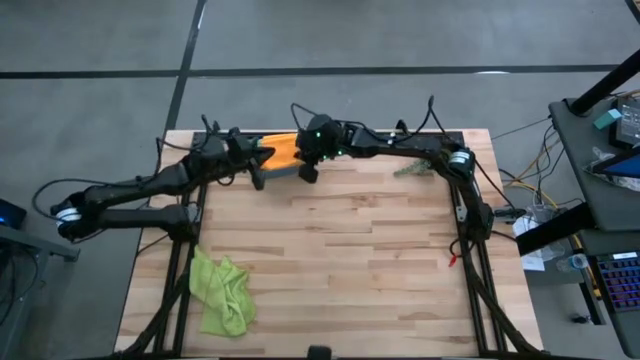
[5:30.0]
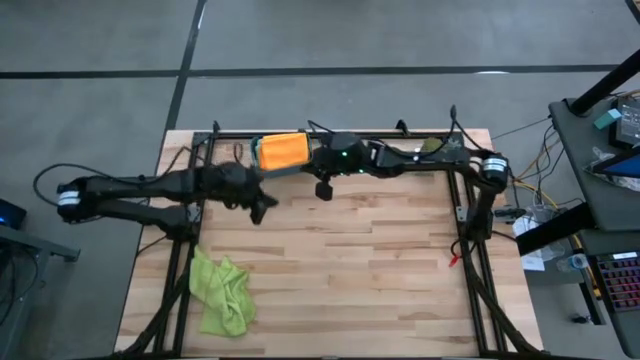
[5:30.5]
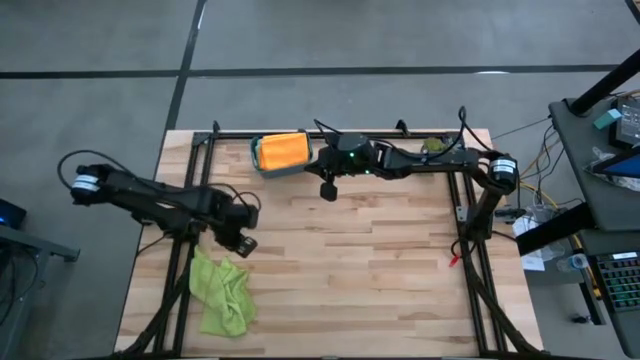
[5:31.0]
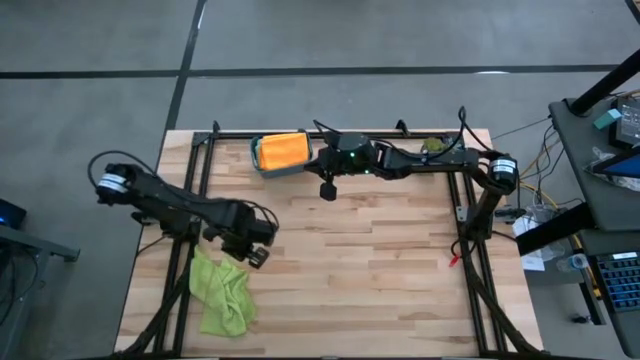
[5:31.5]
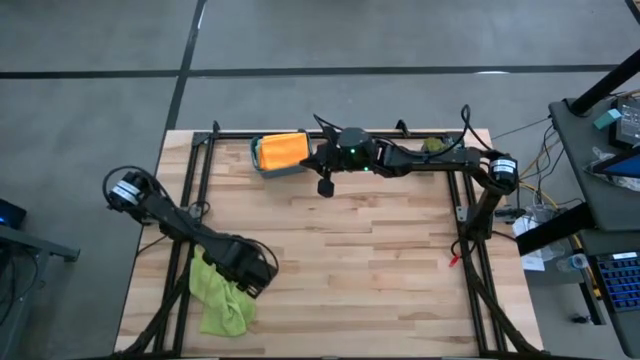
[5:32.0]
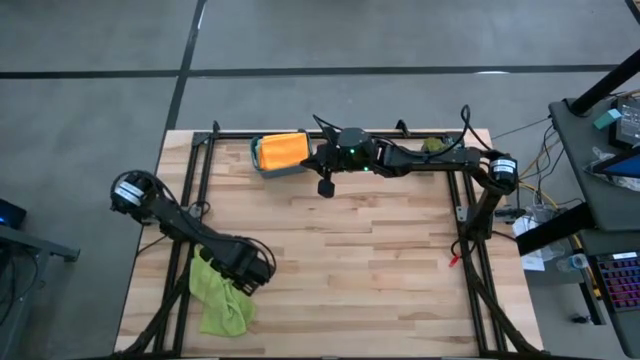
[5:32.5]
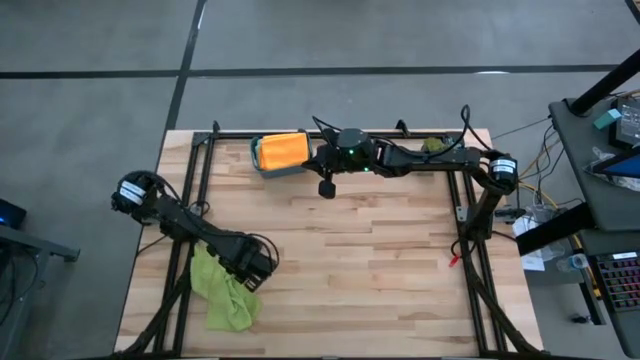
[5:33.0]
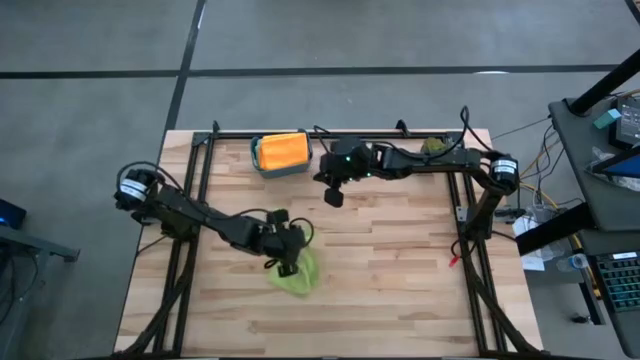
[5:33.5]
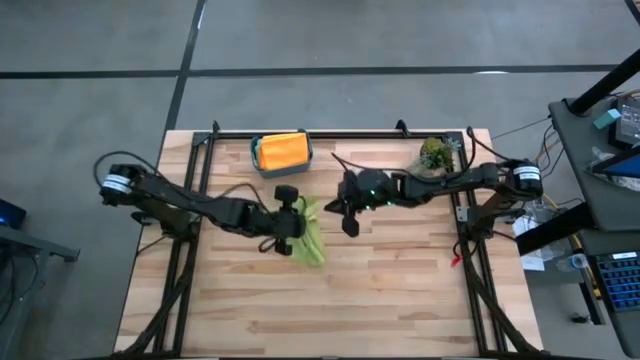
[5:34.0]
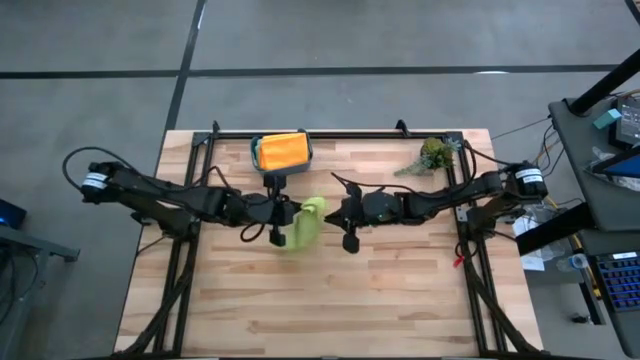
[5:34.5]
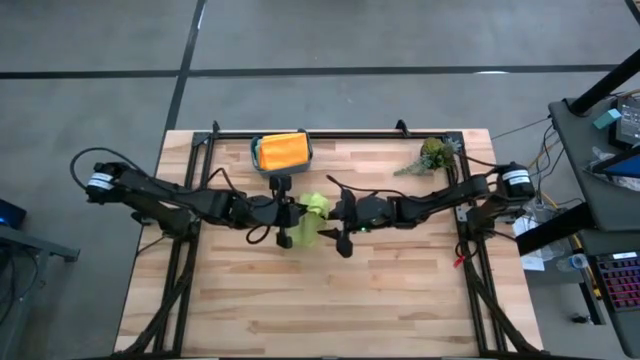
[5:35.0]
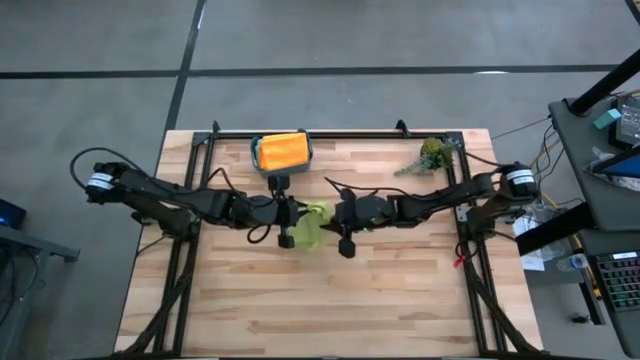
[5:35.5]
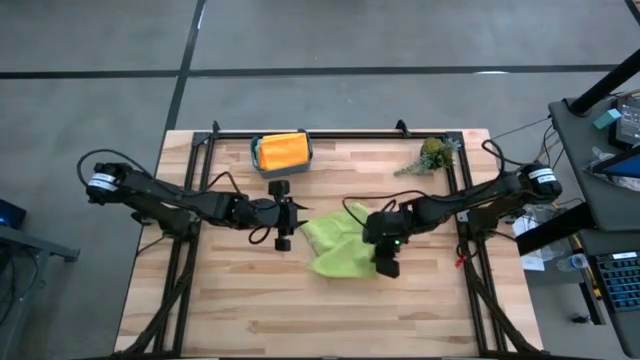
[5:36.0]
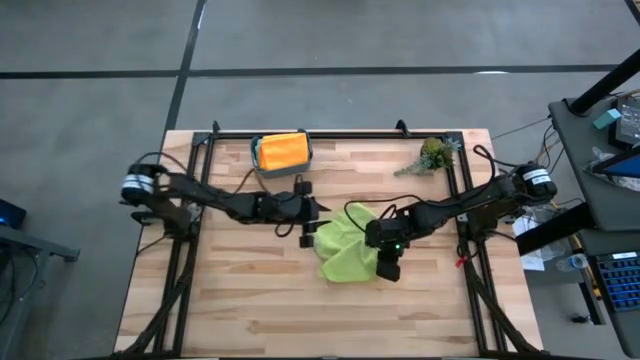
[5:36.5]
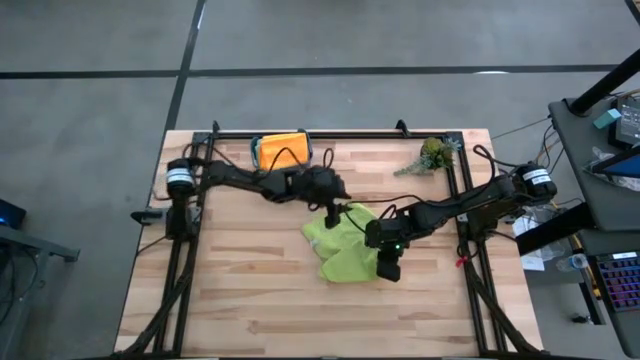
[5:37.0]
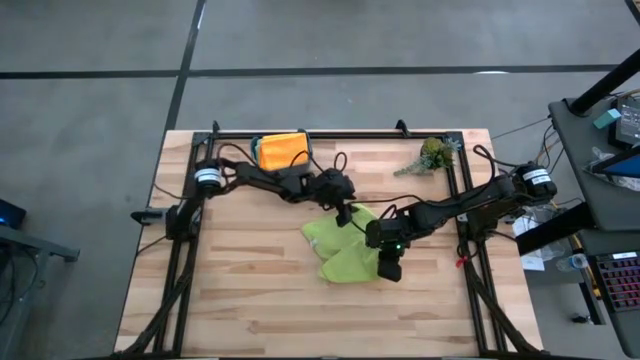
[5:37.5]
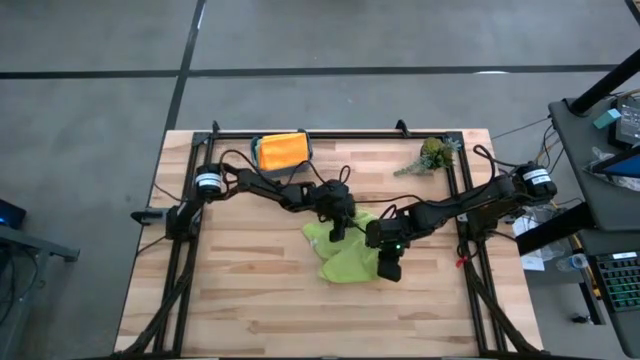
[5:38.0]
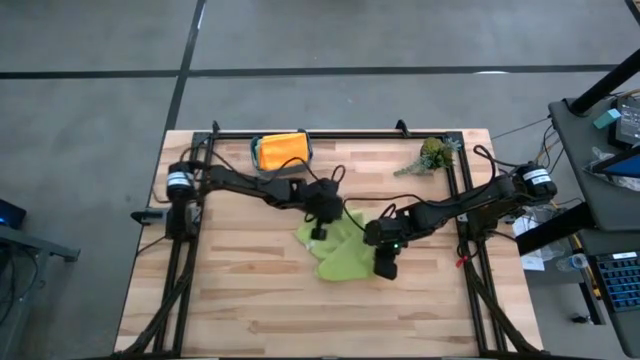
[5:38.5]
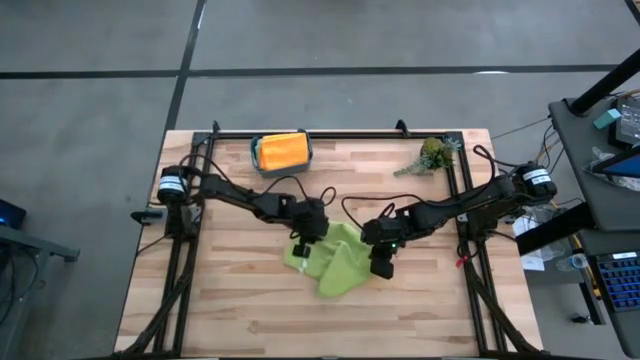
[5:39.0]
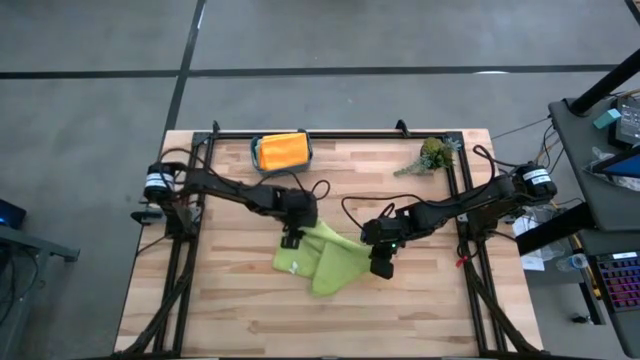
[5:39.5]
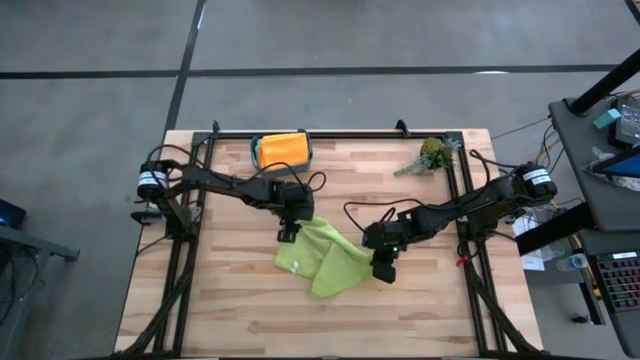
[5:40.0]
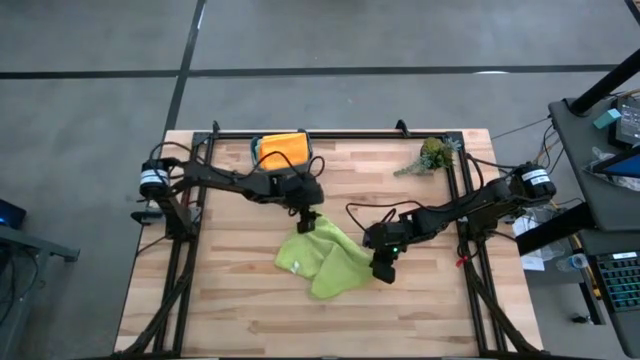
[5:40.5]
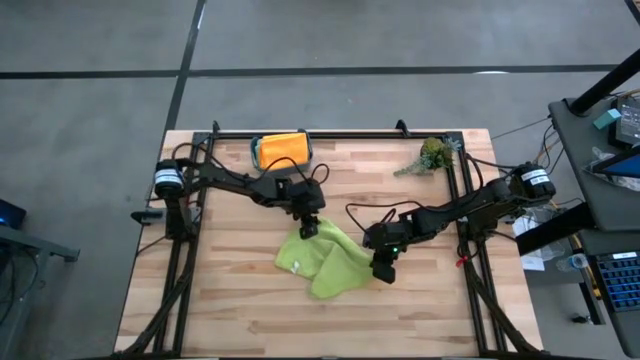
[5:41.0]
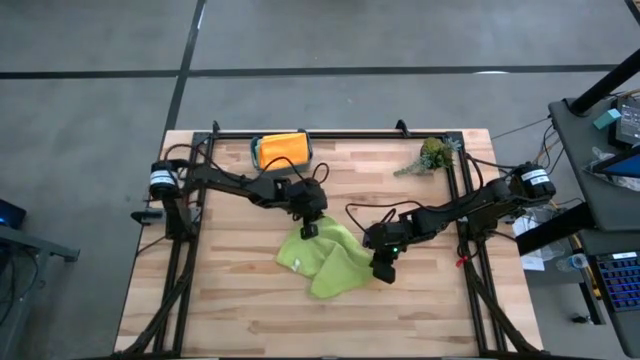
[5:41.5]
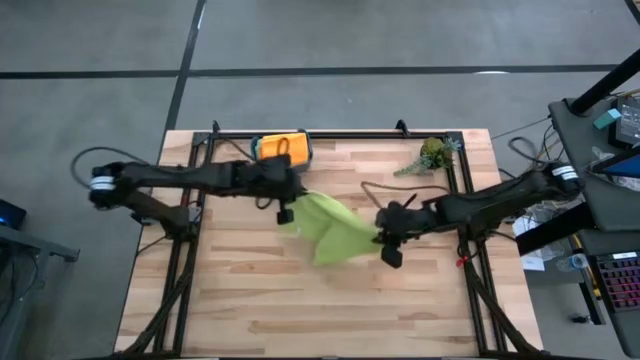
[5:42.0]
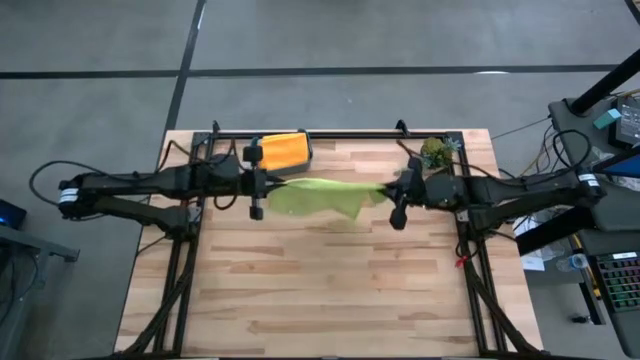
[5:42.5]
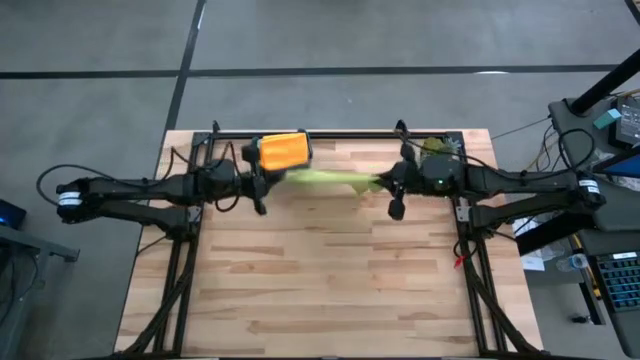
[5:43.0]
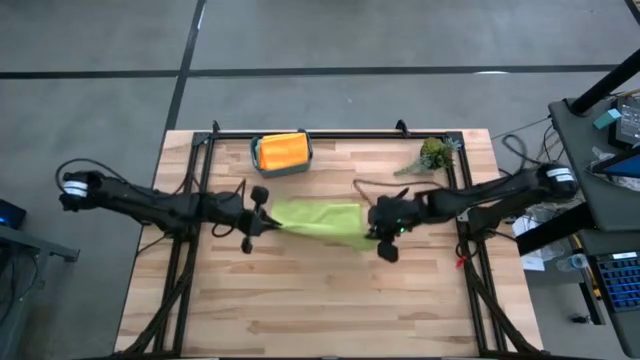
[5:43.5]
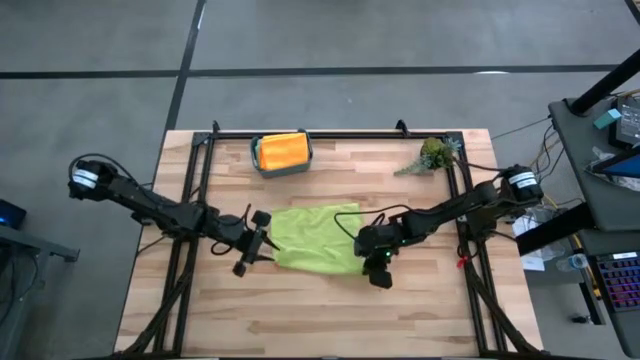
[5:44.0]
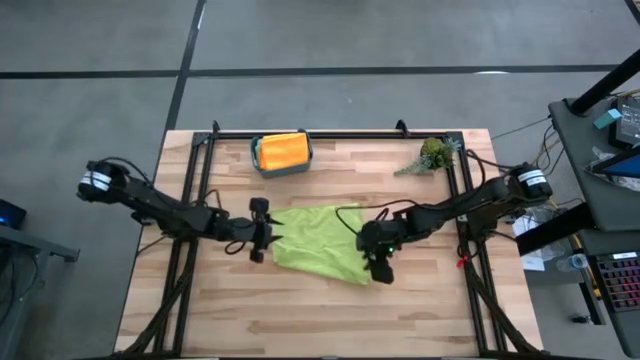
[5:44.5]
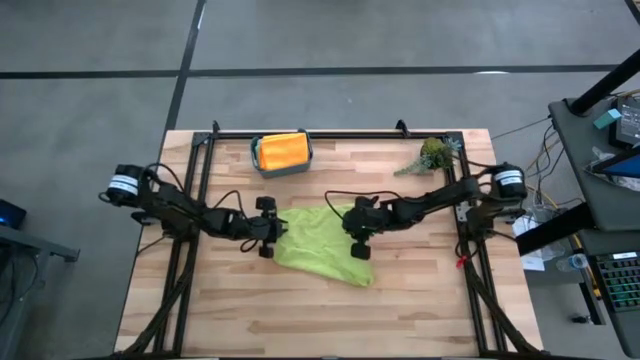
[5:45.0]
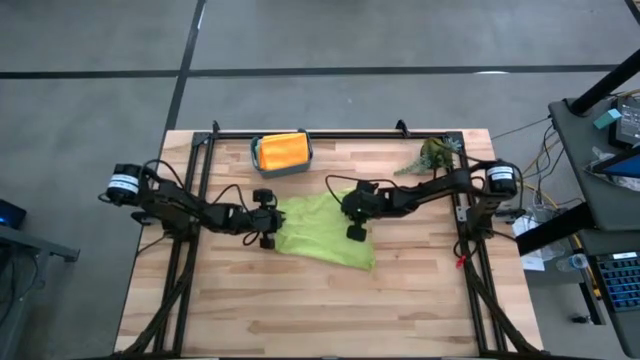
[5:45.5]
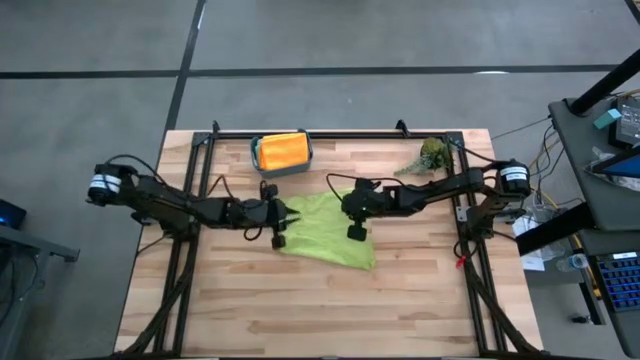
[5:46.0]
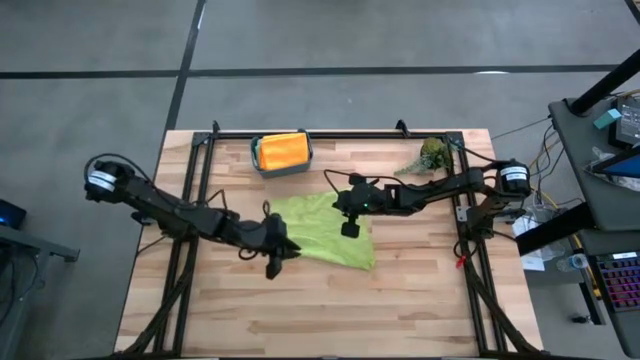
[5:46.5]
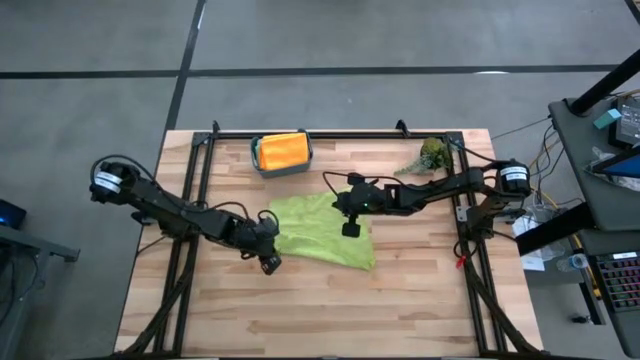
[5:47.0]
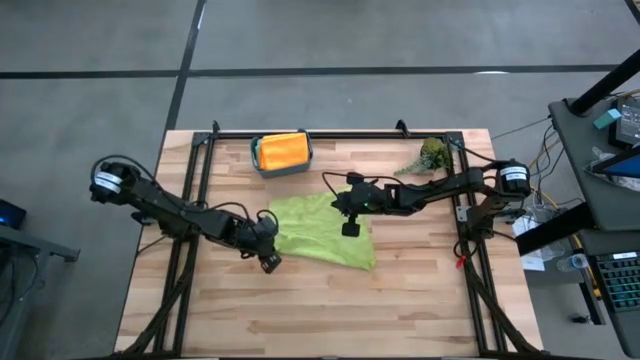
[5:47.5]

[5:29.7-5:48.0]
Task: Fold microfiber towels
Fold the light green microfiber towel

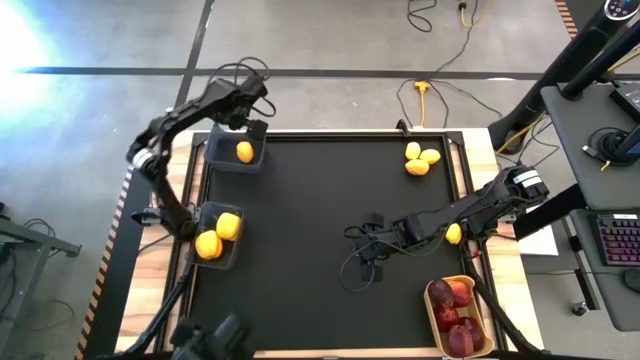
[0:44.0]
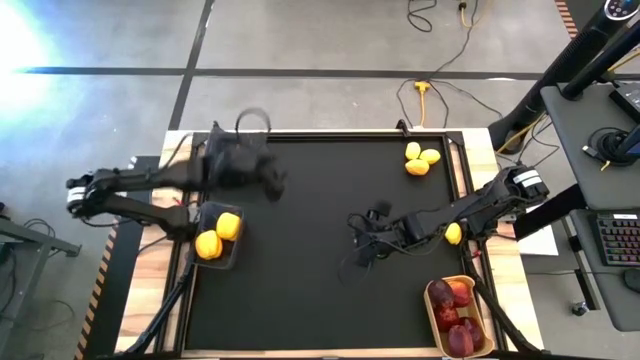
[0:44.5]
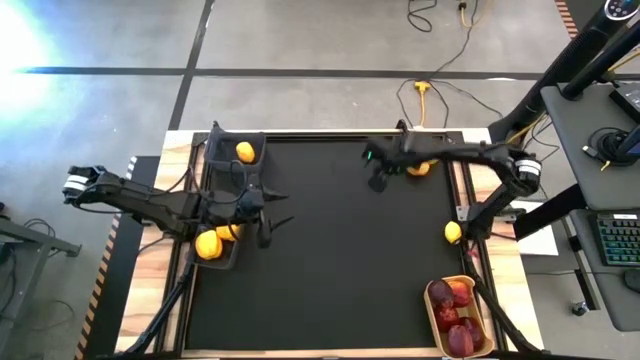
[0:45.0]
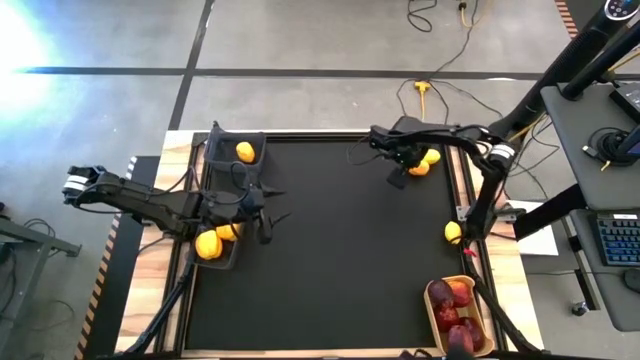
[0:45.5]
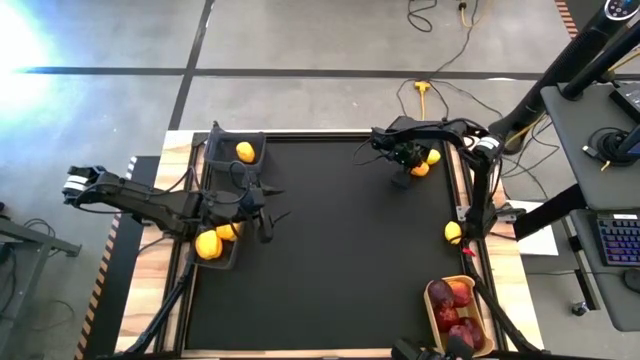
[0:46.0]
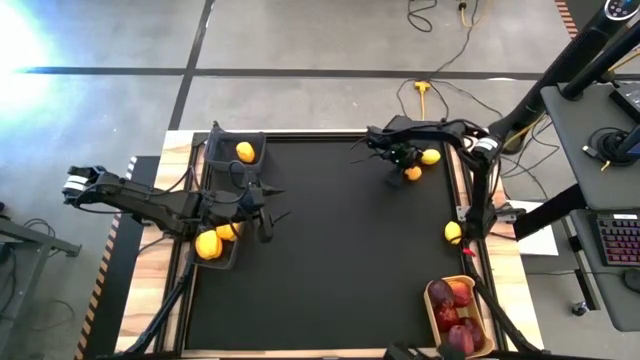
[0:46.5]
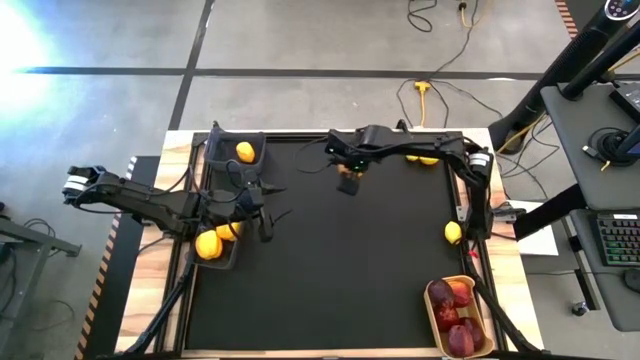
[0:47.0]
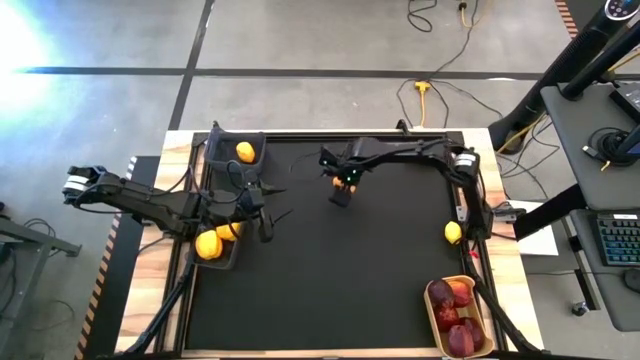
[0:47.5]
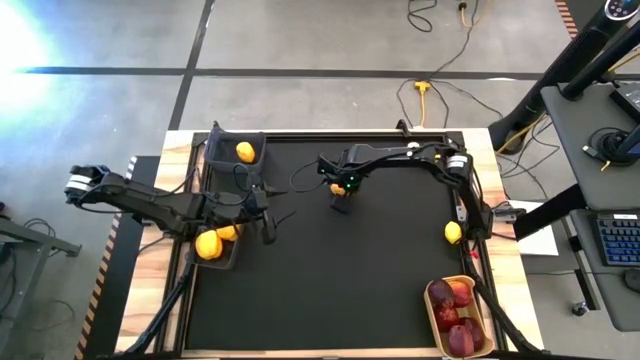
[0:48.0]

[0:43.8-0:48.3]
Task: Sort produce into baskets
Move the lemon to the top center of the table
